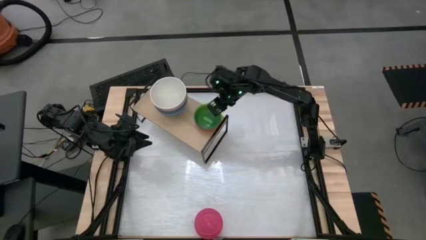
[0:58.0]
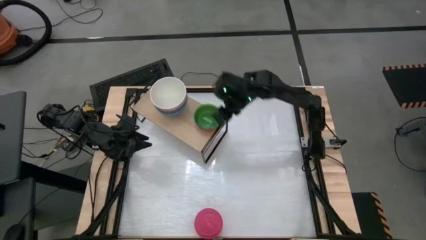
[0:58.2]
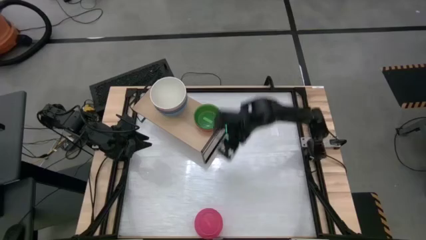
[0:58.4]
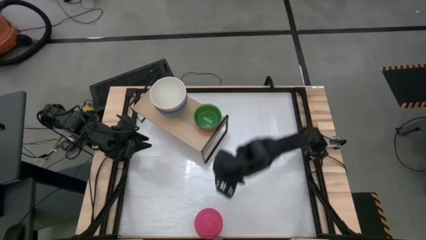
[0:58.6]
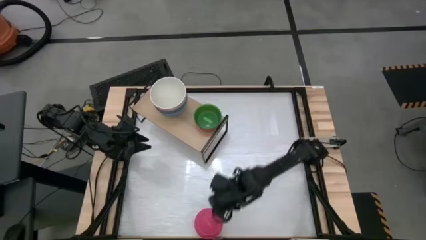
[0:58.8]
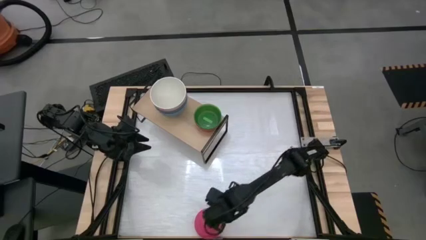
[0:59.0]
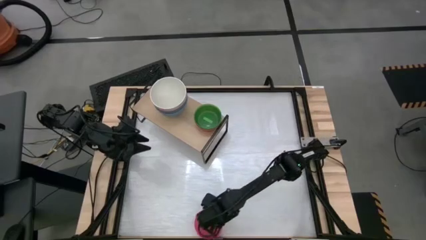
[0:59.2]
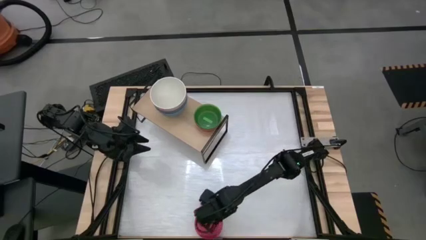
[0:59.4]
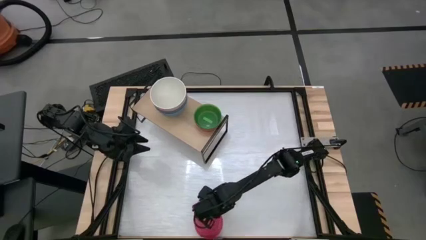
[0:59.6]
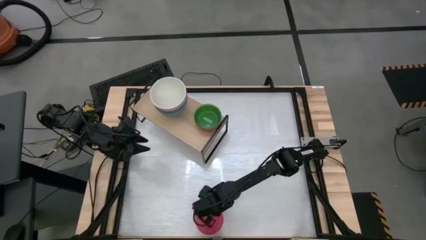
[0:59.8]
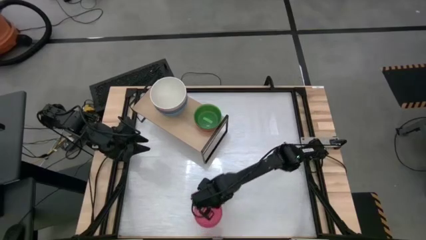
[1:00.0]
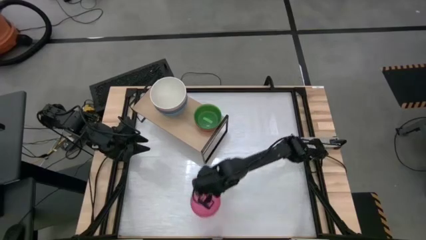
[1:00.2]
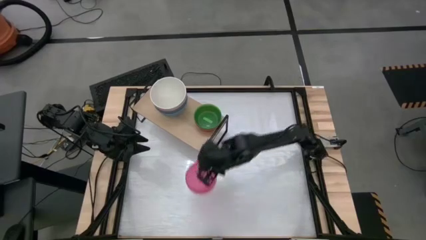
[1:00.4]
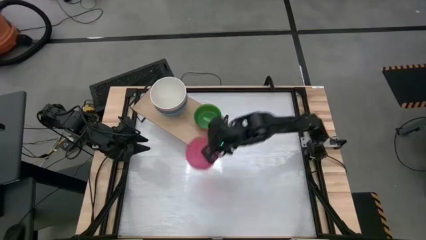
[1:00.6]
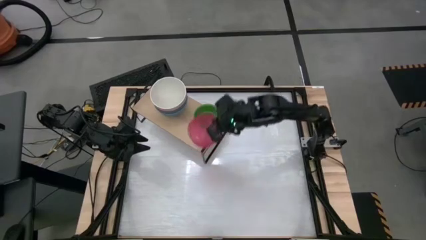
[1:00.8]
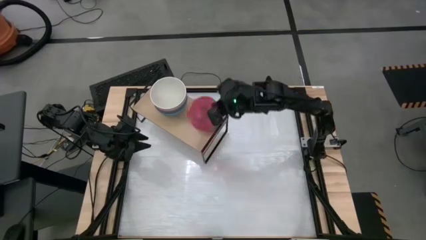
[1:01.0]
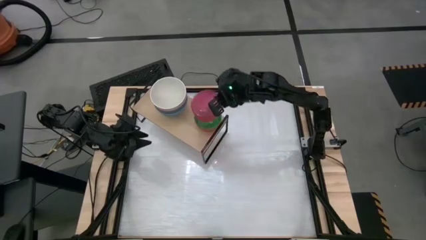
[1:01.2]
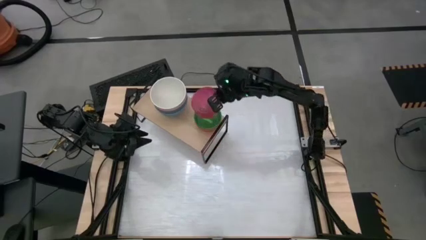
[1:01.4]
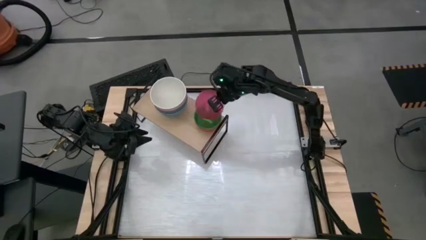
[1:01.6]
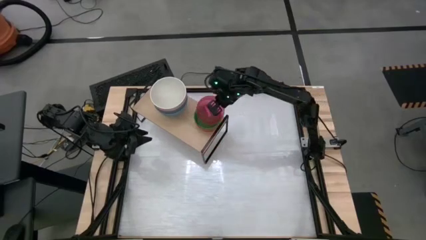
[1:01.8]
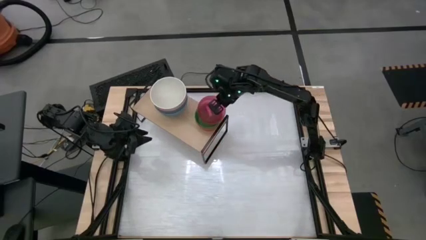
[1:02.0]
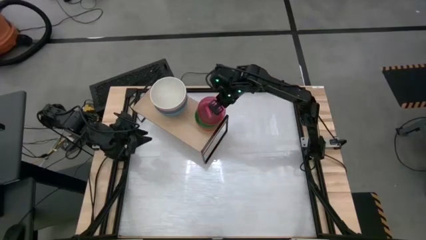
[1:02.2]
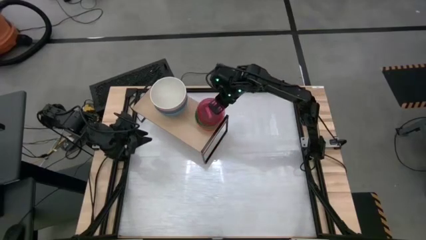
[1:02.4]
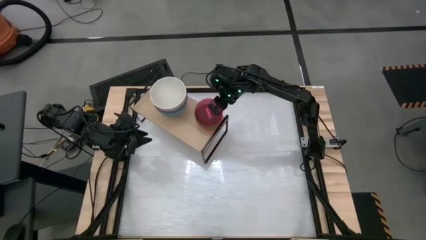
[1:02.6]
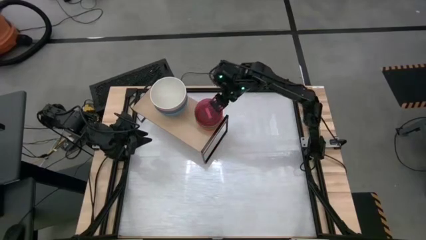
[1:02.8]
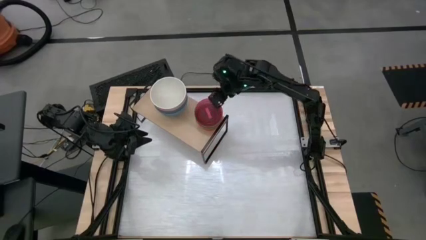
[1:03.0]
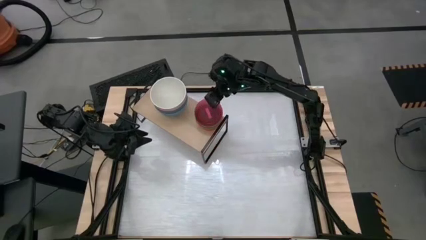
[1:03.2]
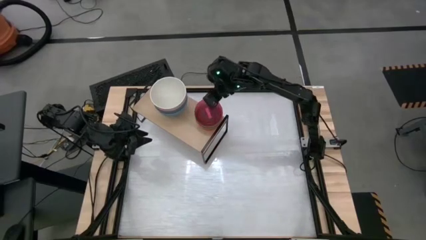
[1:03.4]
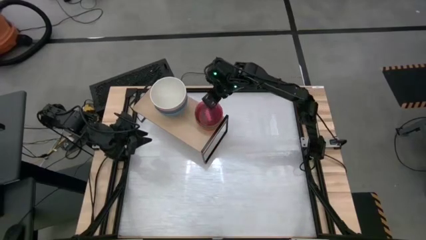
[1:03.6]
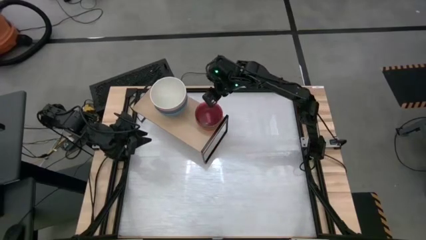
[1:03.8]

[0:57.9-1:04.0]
Task: Place and stack bowls onto a shelf
Stack the pink transparent bowl on top of the green transparent bowl on the shelf

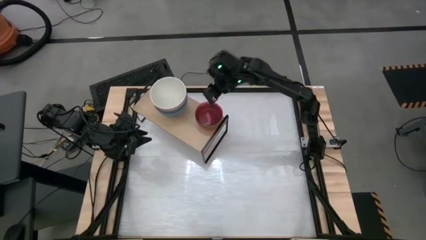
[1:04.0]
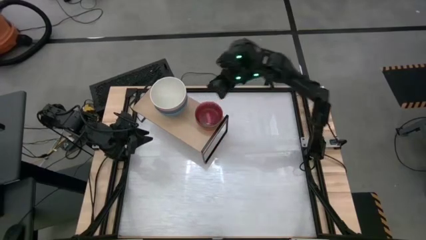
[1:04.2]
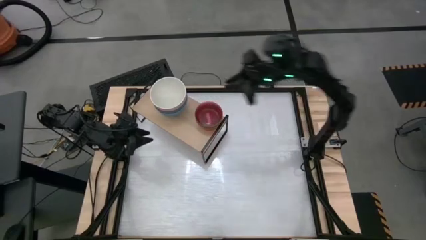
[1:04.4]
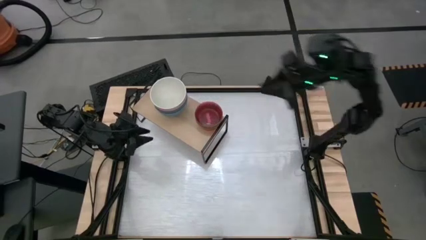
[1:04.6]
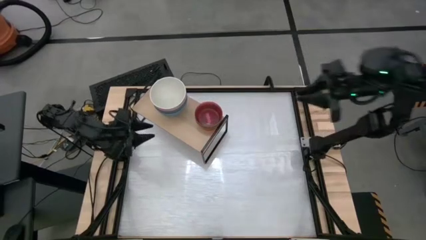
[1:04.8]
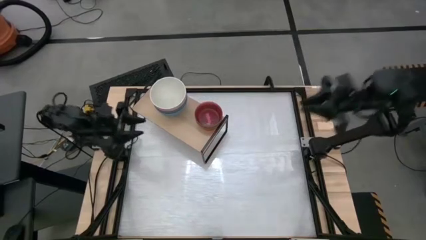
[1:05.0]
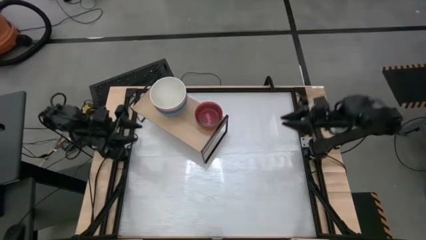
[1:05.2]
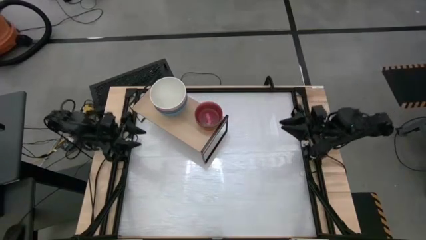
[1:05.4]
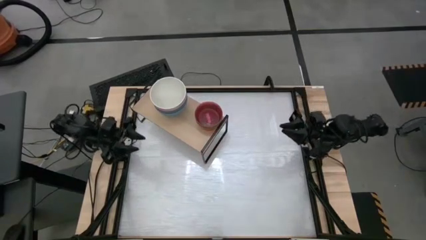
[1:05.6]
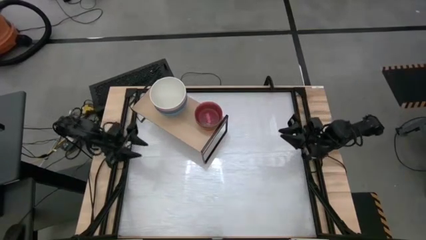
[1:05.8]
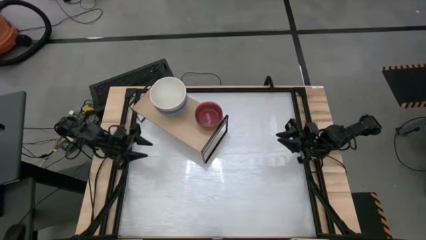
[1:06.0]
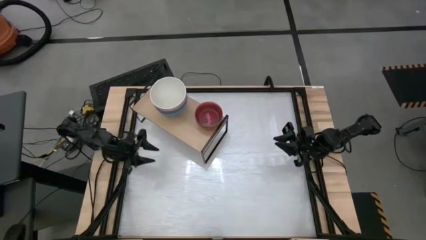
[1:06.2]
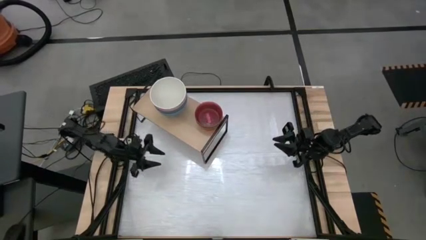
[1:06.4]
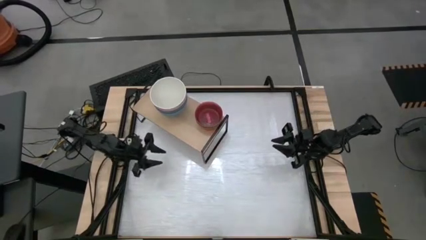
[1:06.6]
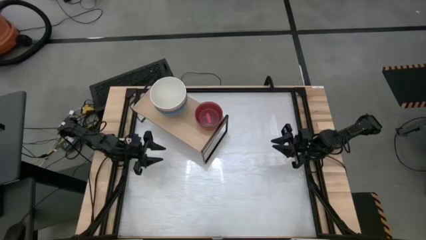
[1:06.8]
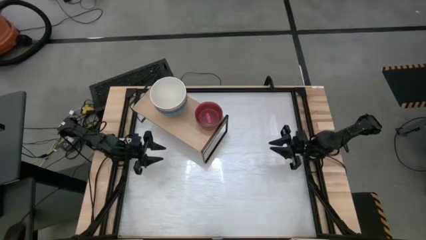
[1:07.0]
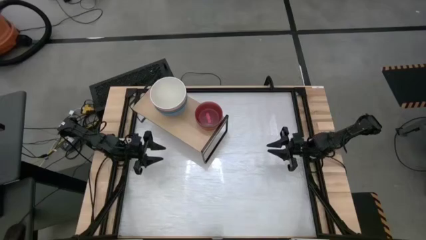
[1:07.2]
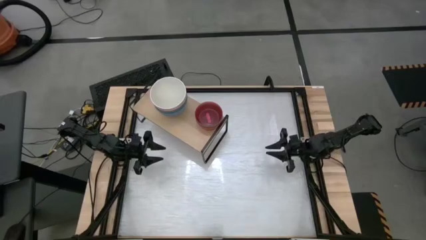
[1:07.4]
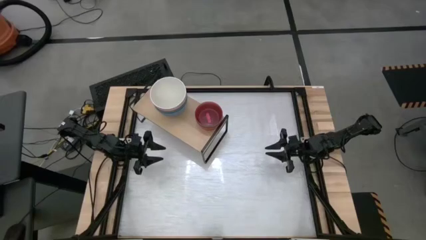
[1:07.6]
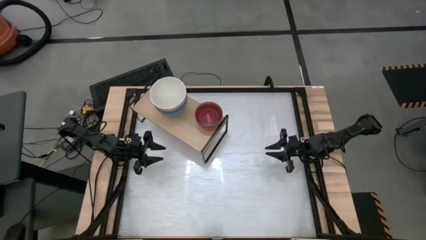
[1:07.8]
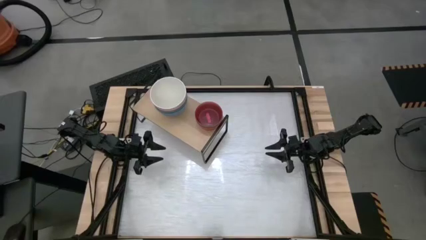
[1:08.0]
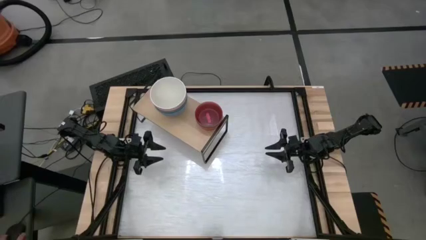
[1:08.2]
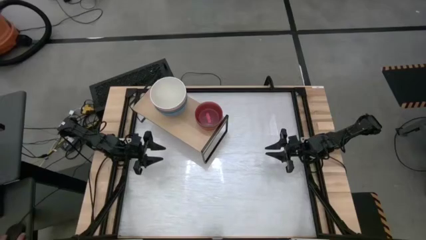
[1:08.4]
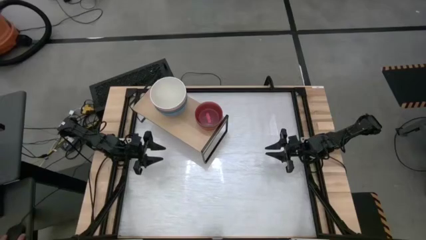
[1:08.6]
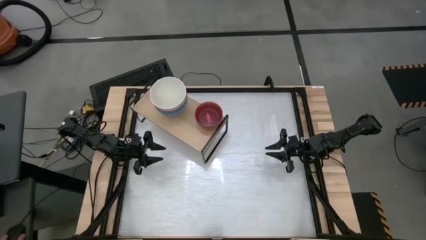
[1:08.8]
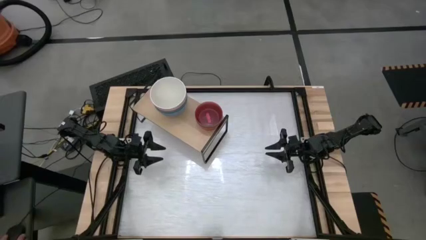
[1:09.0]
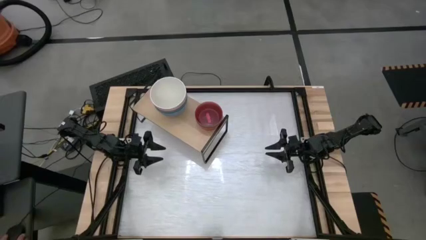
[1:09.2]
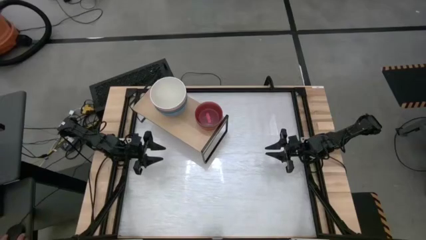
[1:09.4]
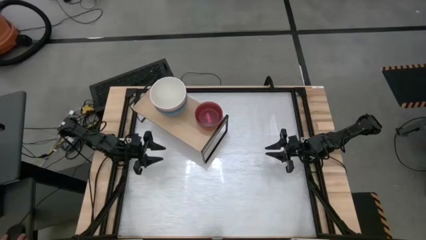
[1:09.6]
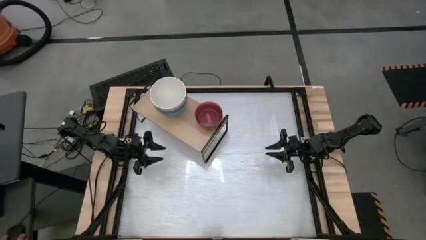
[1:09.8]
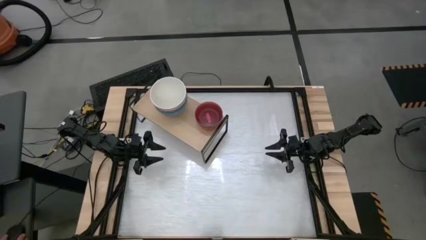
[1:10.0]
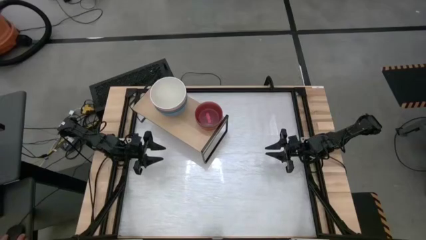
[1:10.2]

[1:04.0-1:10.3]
Return to Home Position

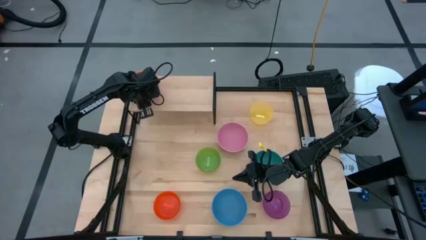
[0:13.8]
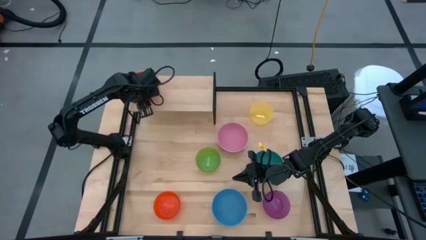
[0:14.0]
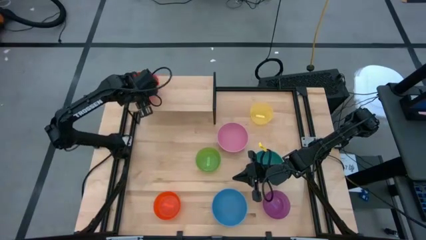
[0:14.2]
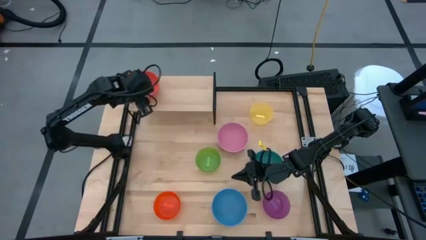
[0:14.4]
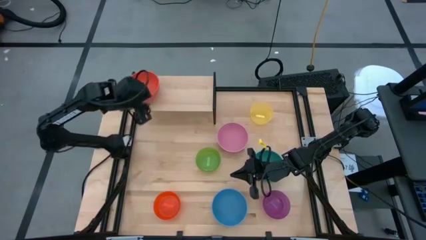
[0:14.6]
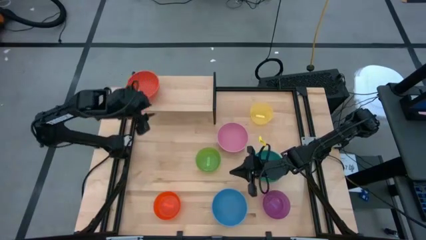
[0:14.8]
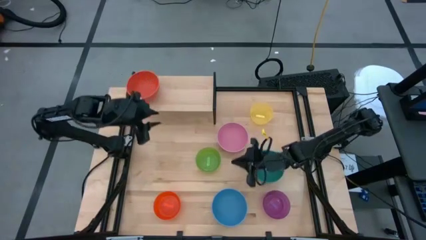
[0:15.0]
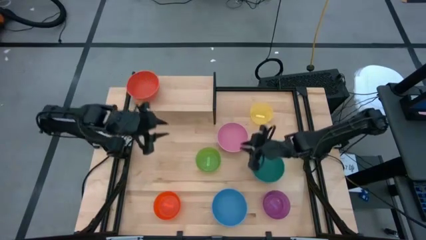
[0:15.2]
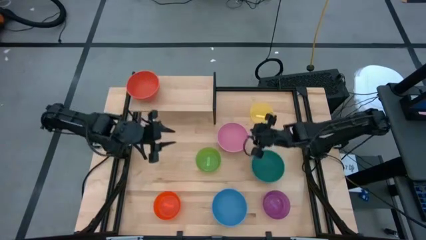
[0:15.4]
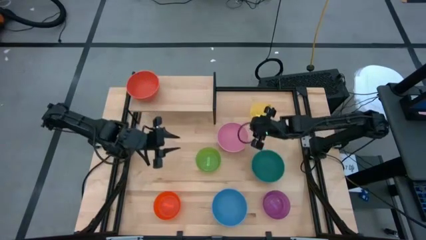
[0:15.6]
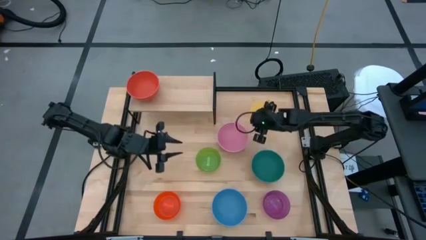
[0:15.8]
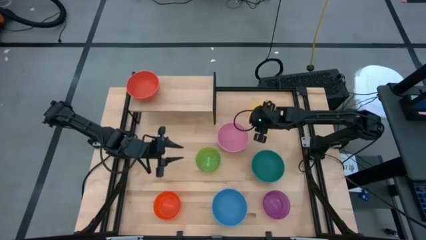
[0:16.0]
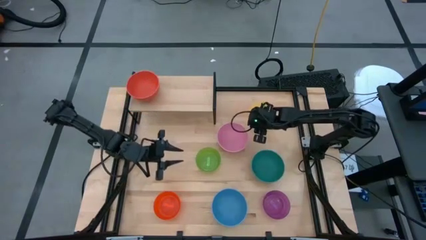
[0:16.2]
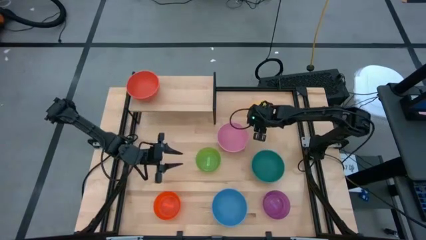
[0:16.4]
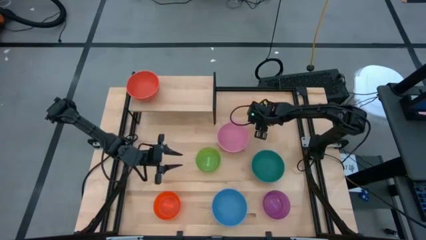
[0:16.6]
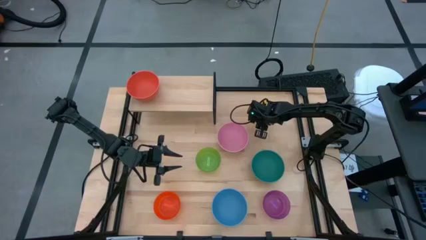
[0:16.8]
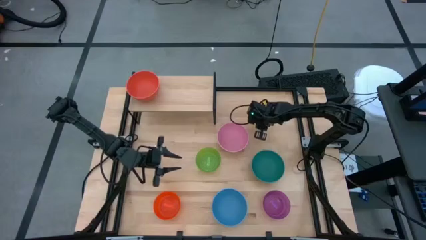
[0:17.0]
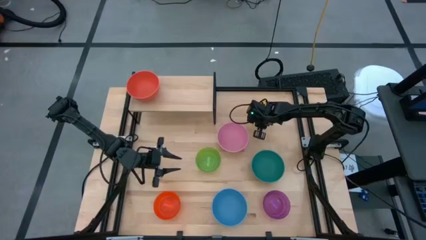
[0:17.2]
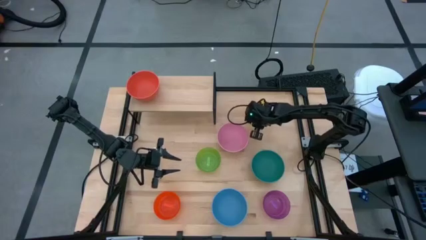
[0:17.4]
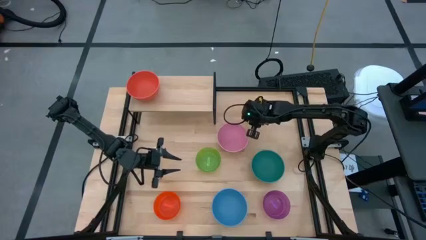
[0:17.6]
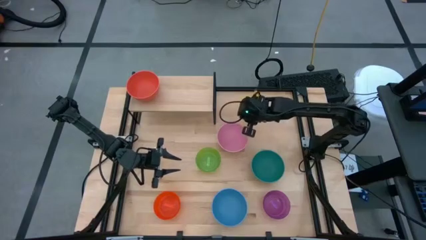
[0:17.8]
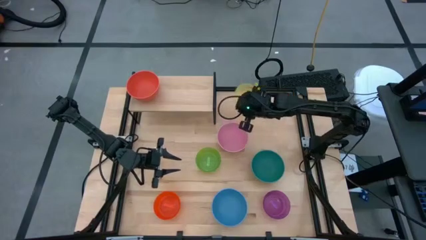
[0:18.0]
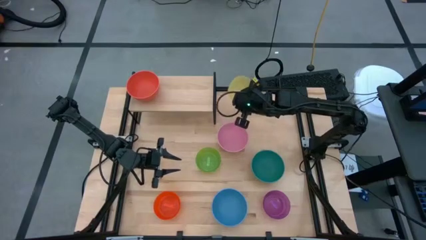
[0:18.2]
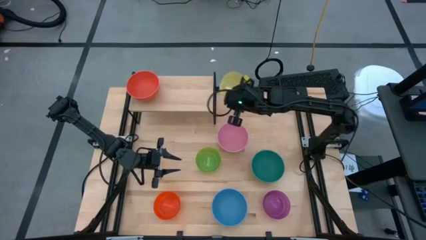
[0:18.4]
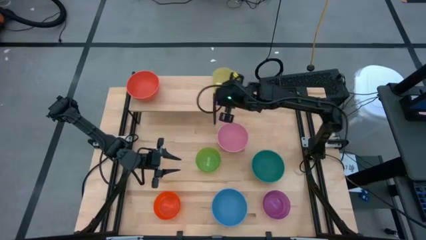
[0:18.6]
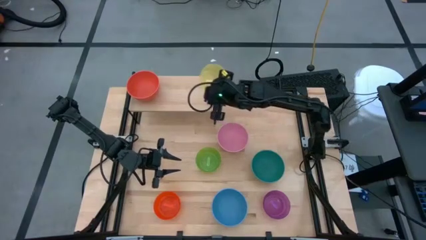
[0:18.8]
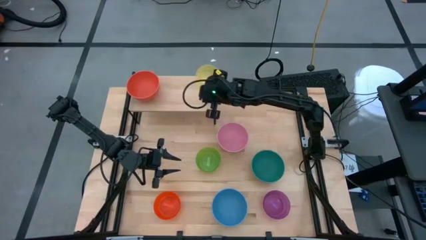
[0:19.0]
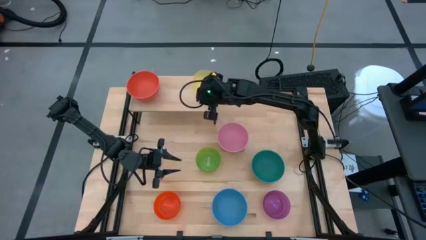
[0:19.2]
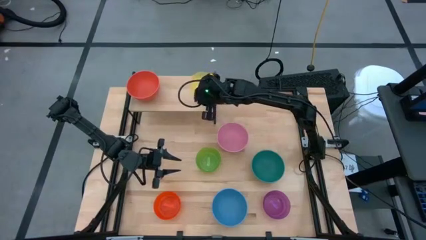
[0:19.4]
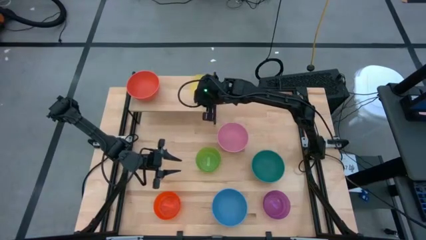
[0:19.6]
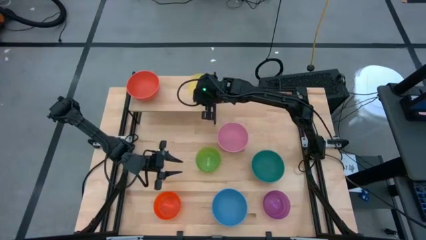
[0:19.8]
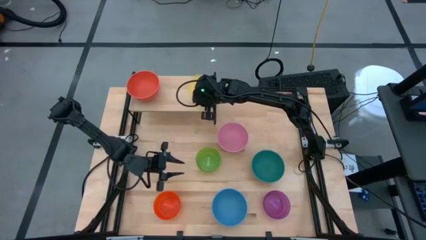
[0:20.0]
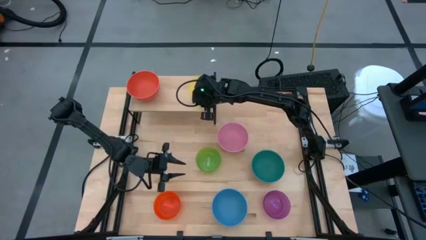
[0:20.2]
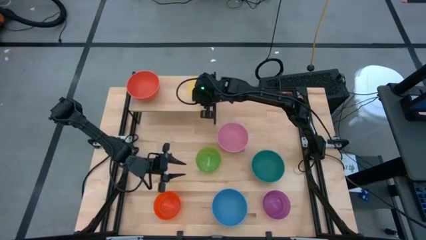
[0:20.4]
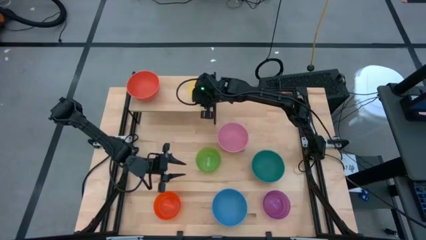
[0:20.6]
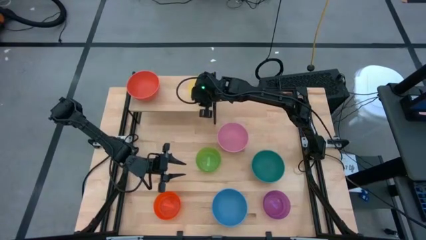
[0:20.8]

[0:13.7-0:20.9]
Task: Place and stack bowls onto a shelf
Put the yellow bowl on the shelf
